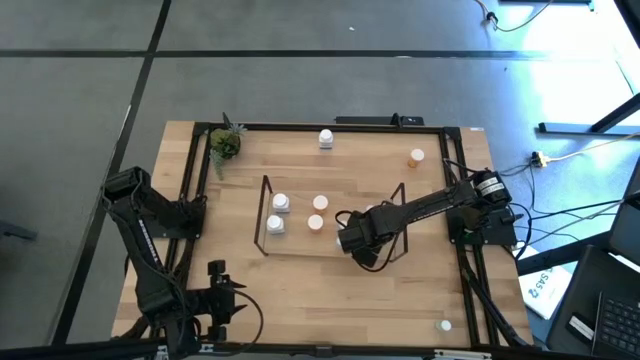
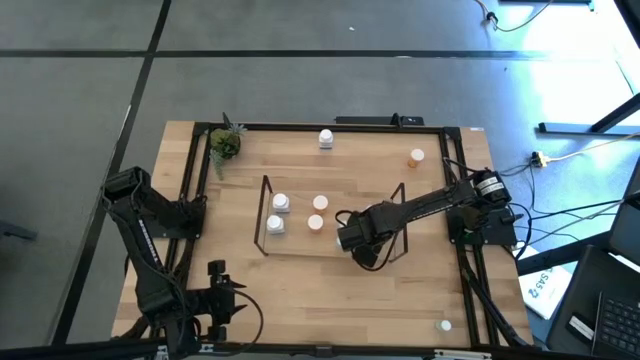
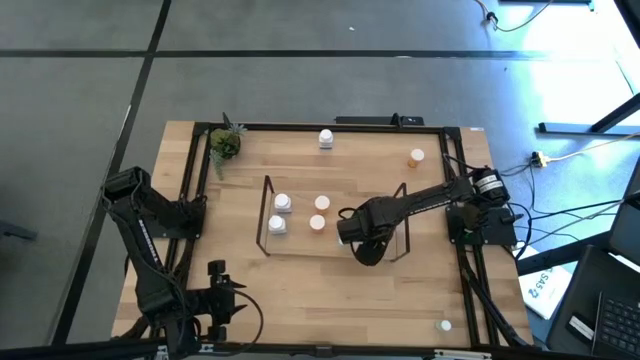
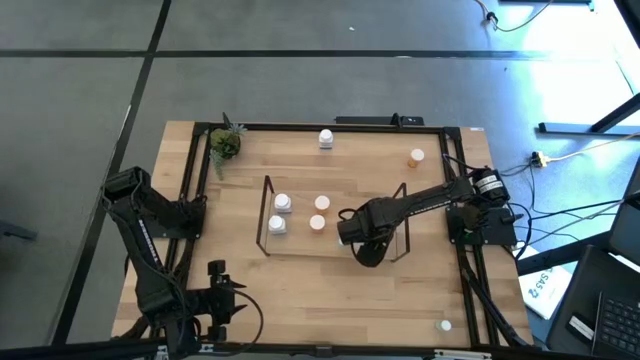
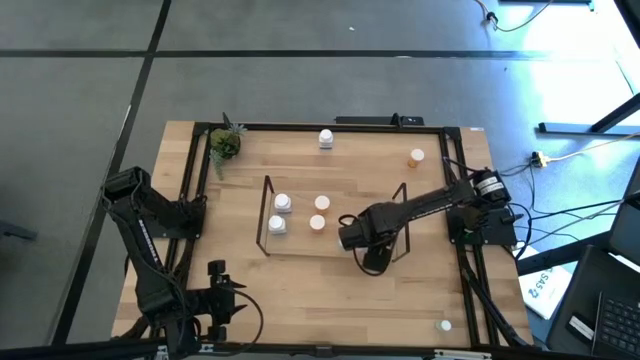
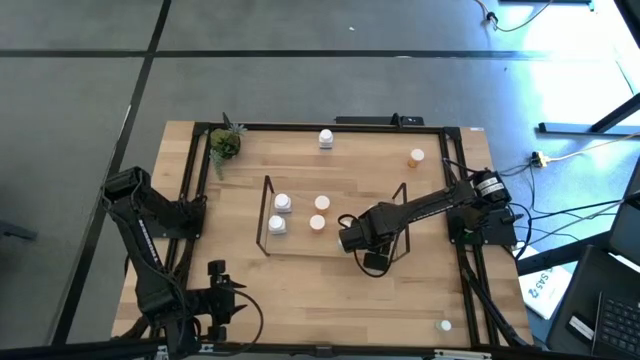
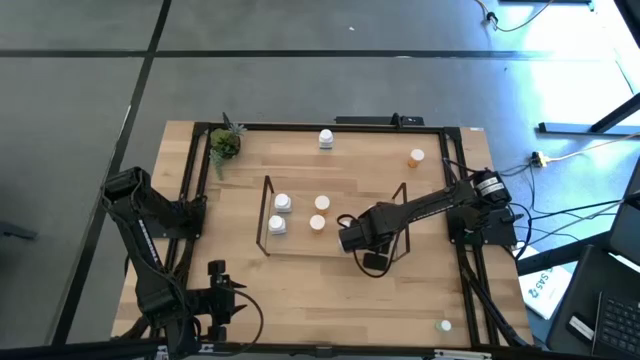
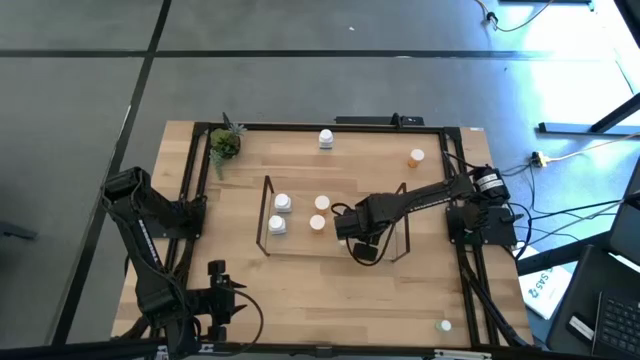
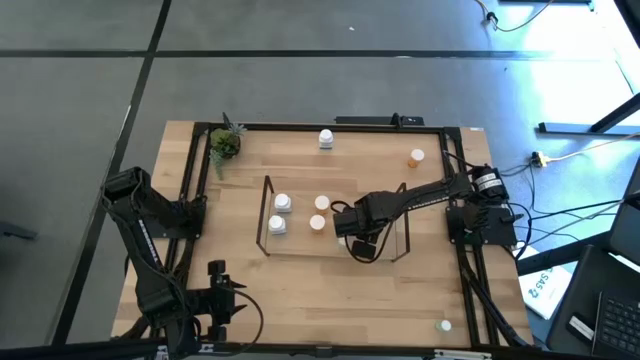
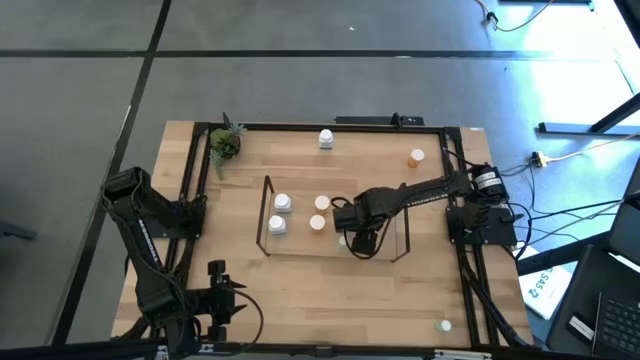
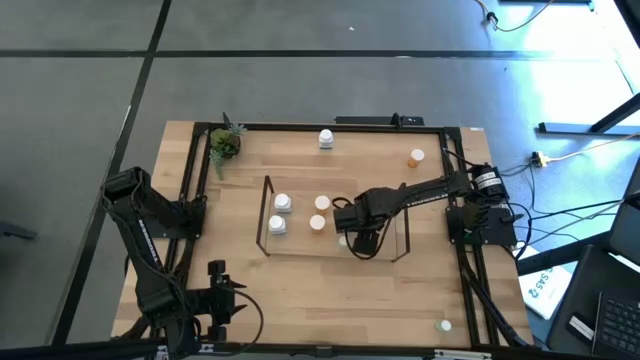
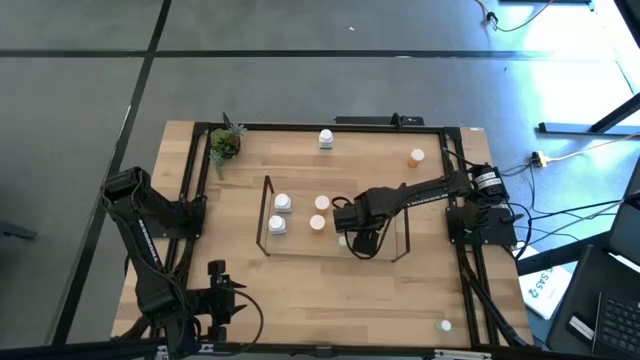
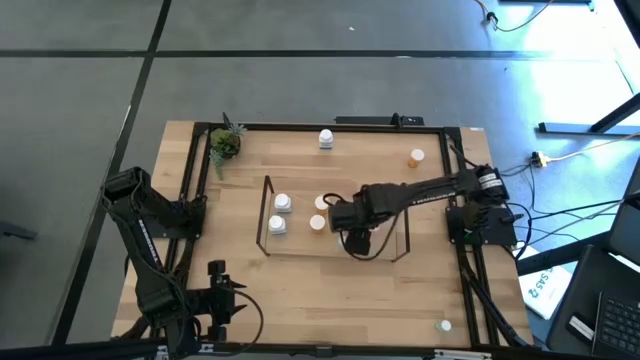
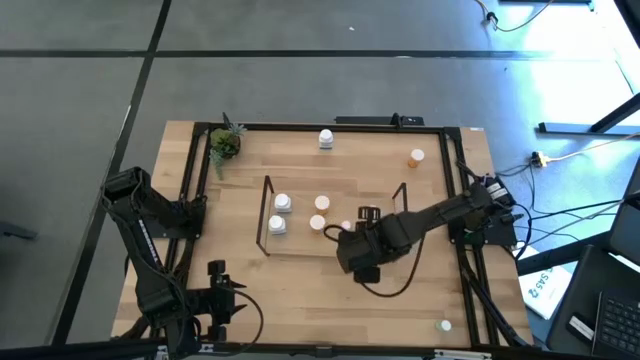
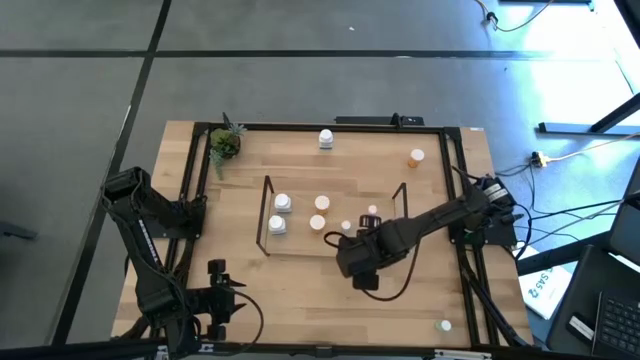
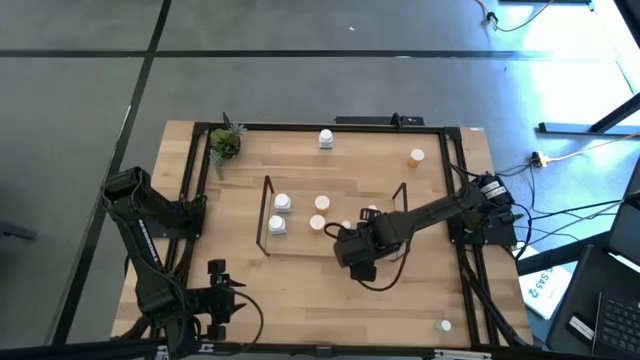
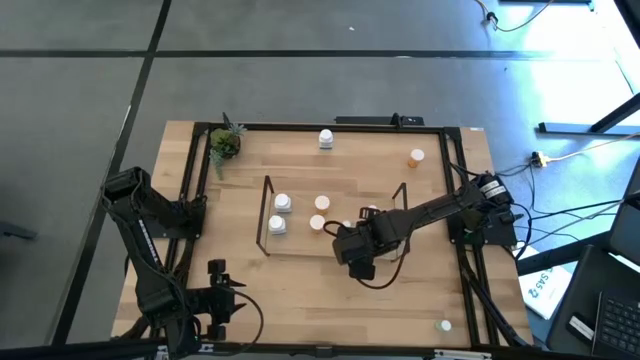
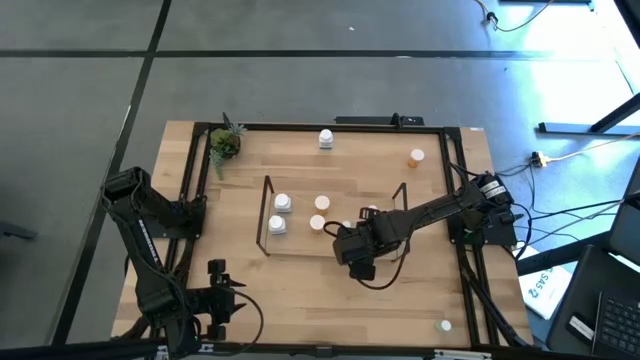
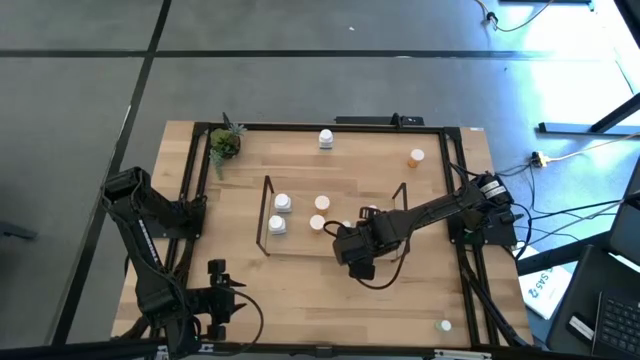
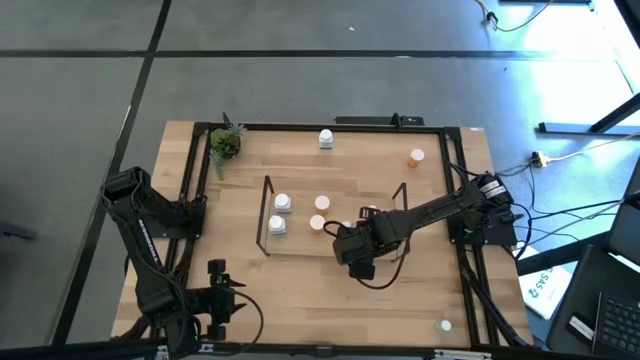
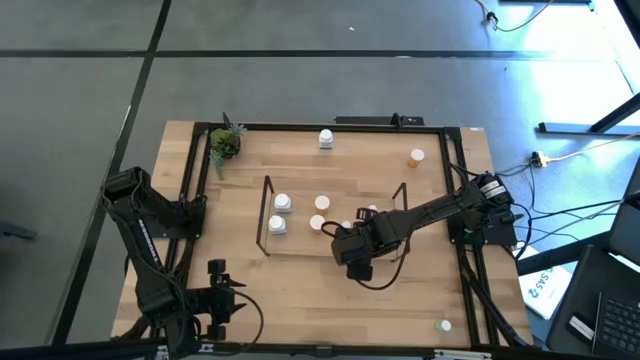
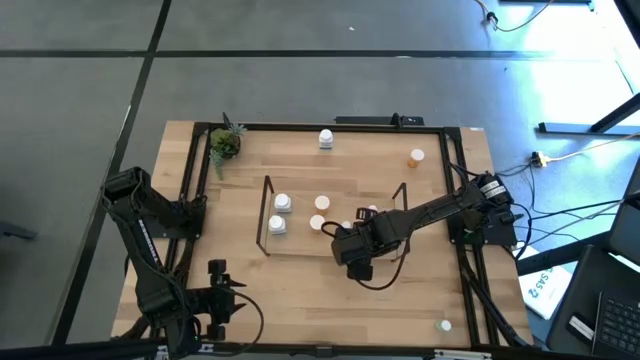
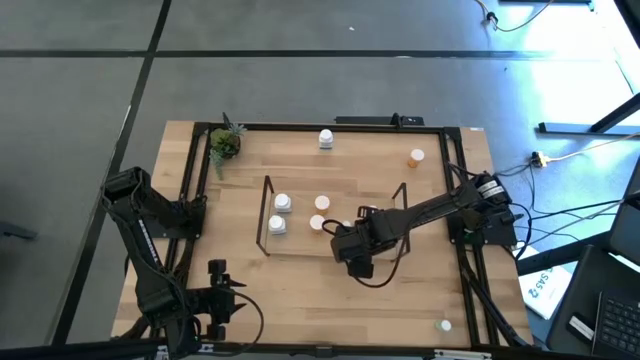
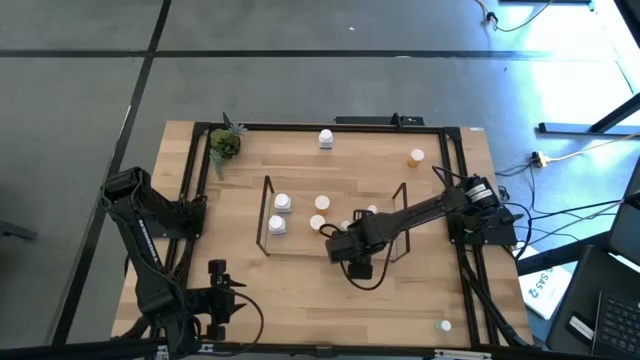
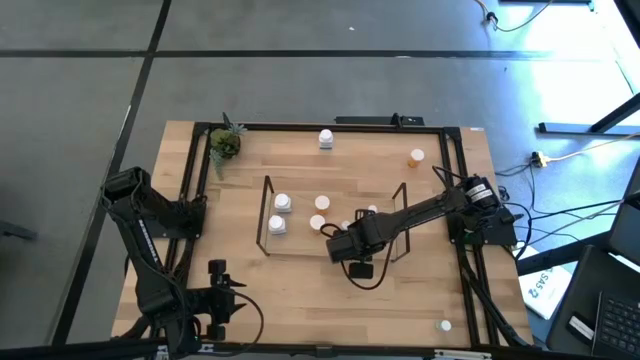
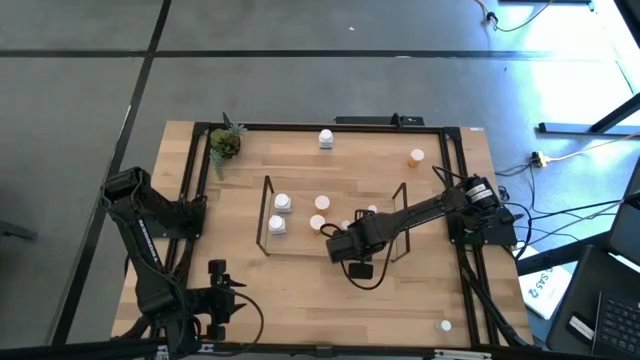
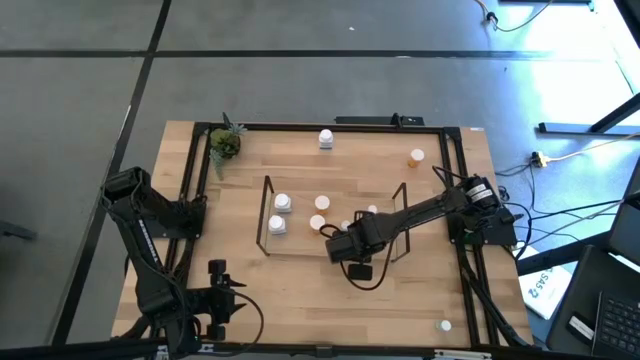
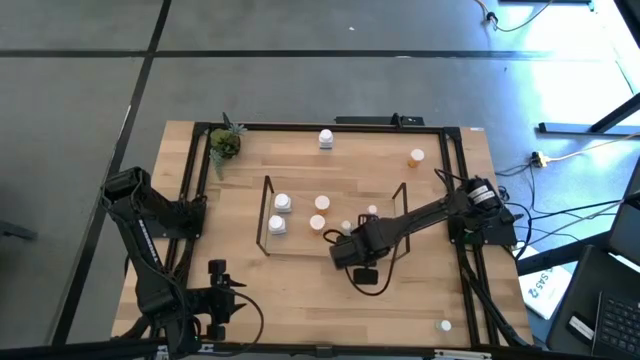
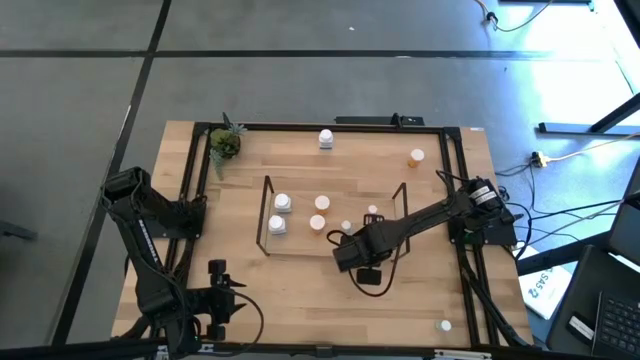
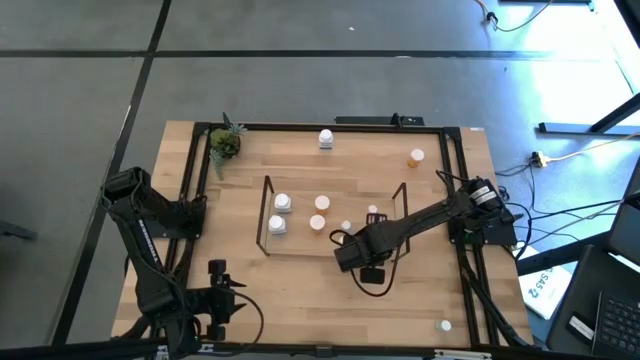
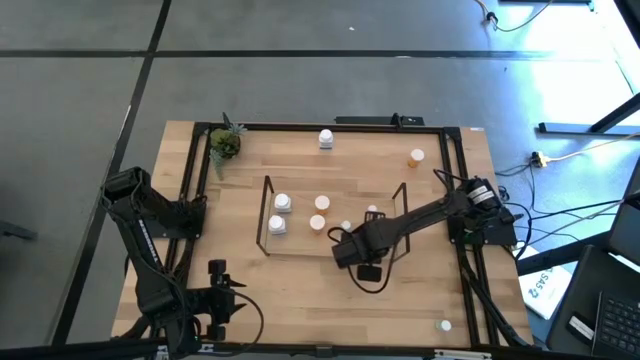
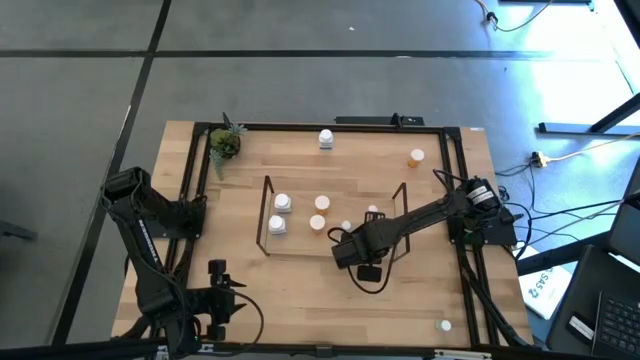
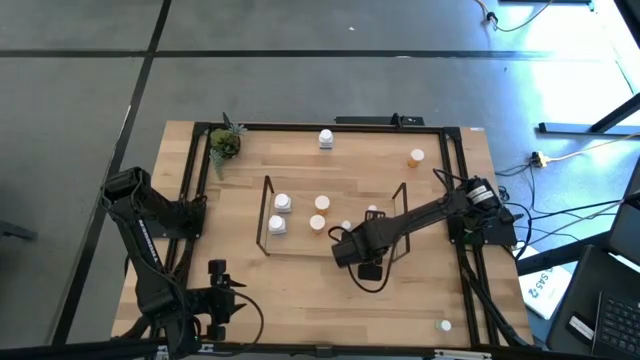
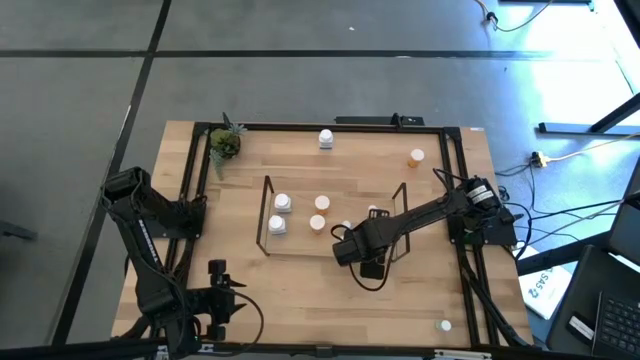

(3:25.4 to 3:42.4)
Task: Pick and place medicine bottles onto shelf by color
Adjust the pink pill bottles on the shelf

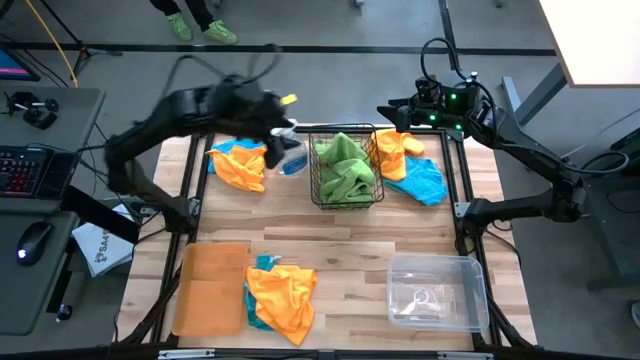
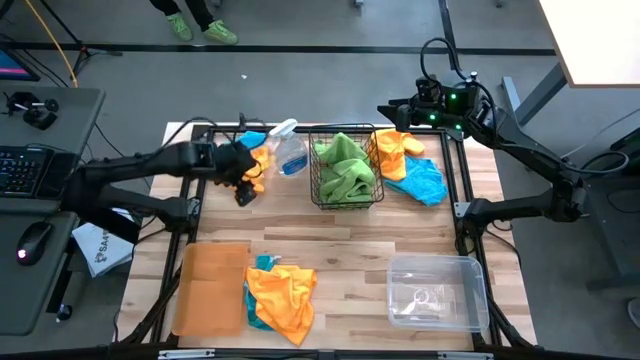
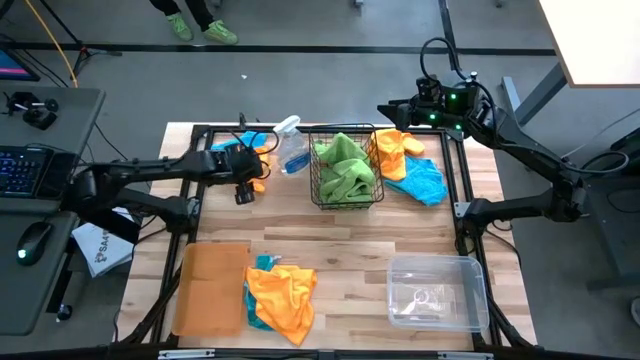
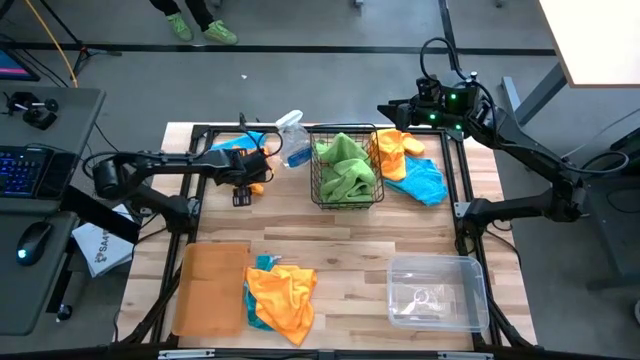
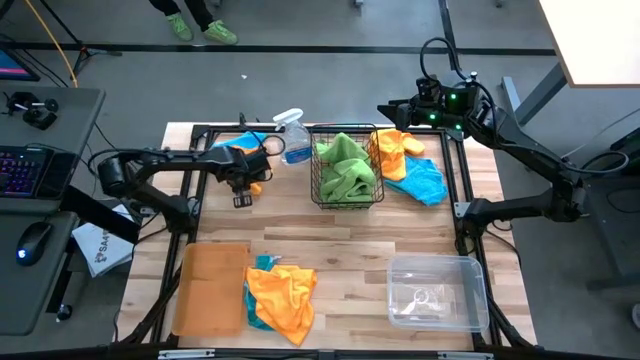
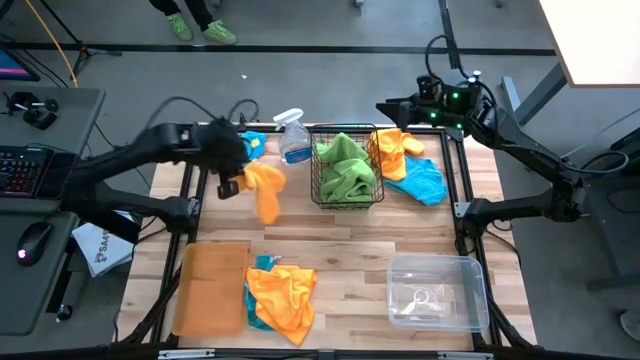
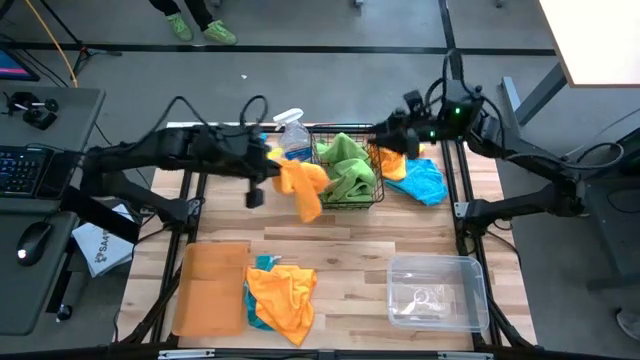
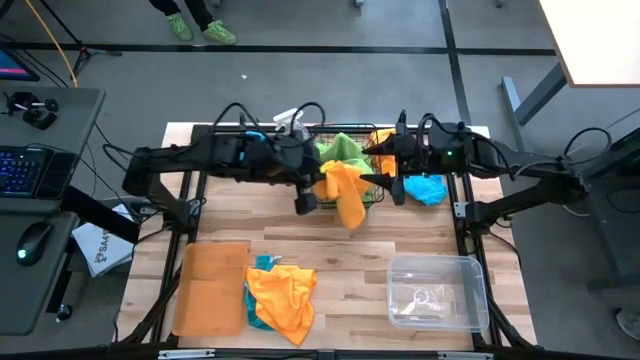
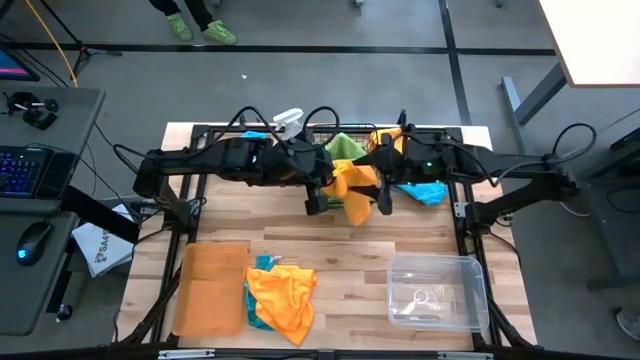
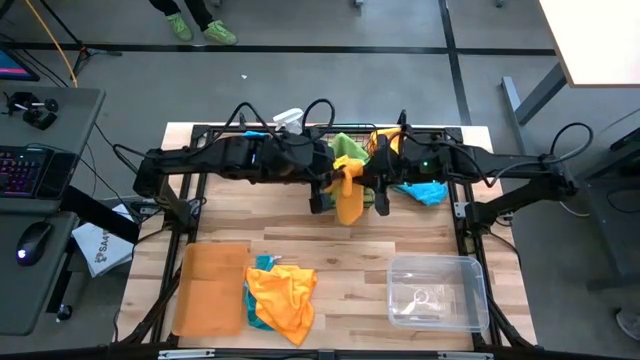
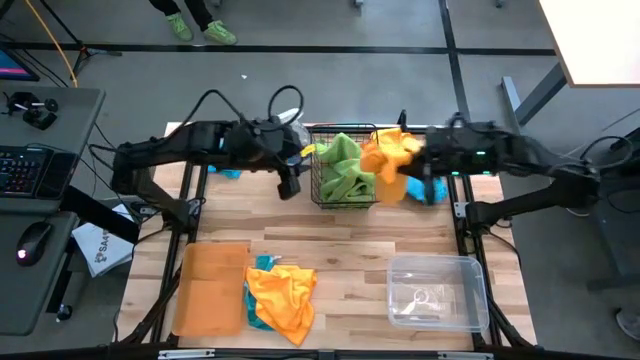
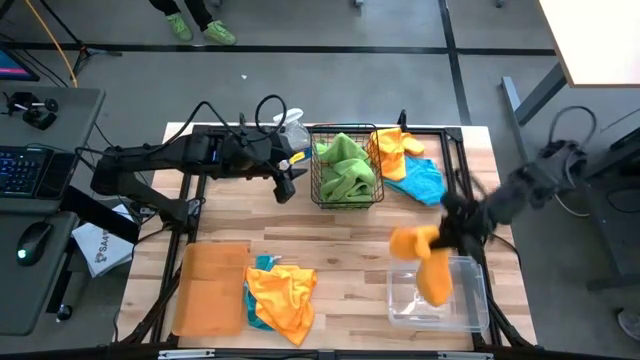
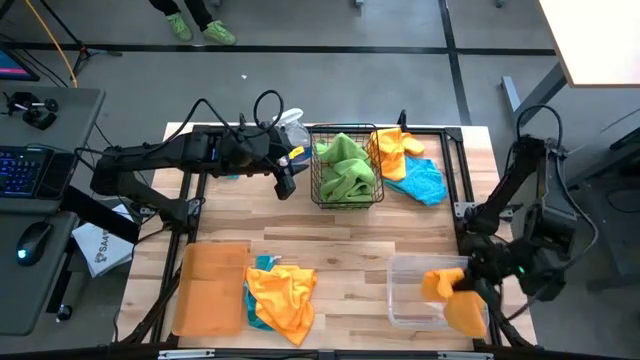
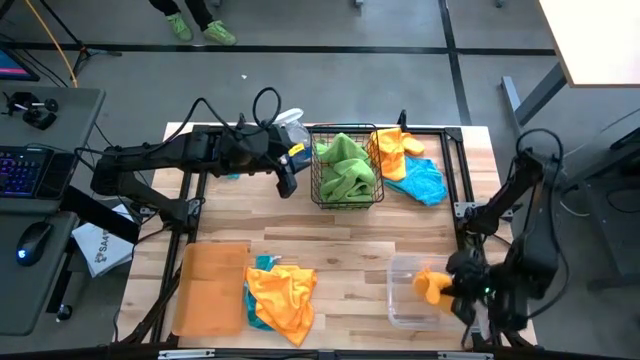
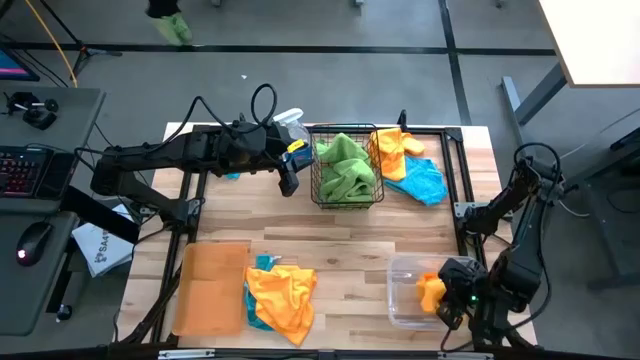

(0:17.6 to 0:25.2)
Task: Sort microfiber towel by color & place in baskets
Put the top left yellow towel into the transparent bin
